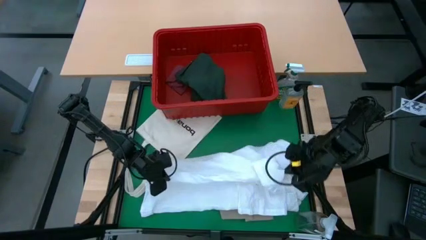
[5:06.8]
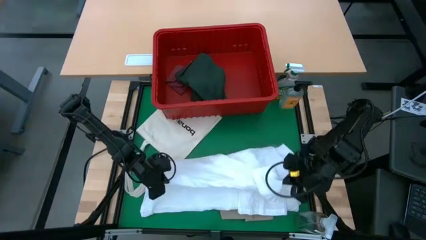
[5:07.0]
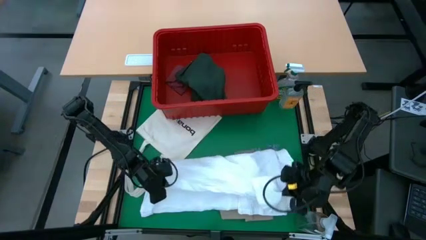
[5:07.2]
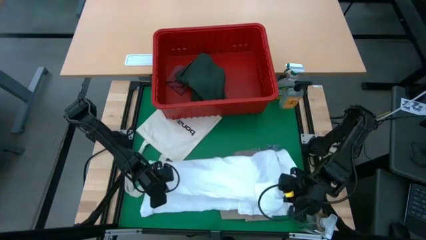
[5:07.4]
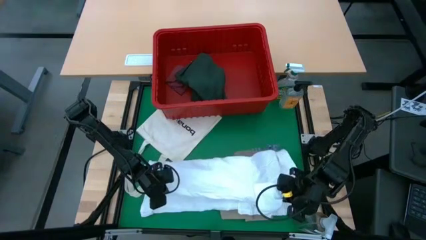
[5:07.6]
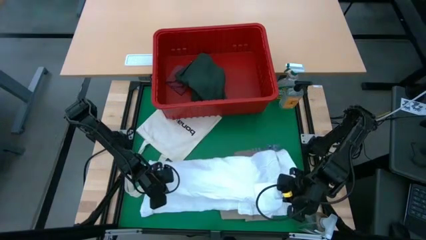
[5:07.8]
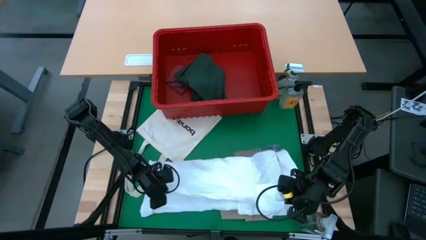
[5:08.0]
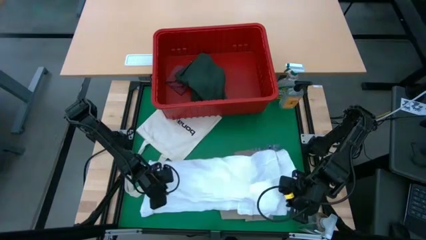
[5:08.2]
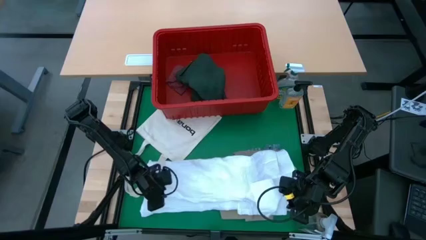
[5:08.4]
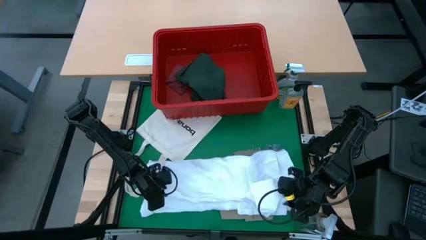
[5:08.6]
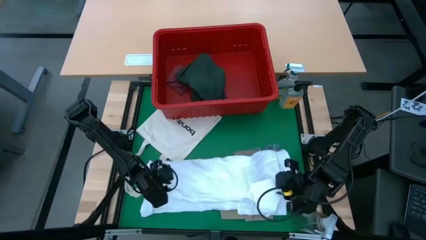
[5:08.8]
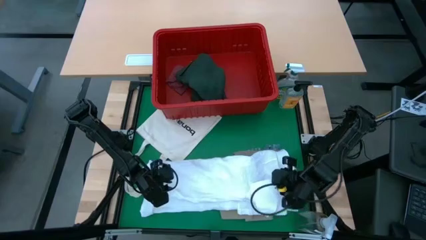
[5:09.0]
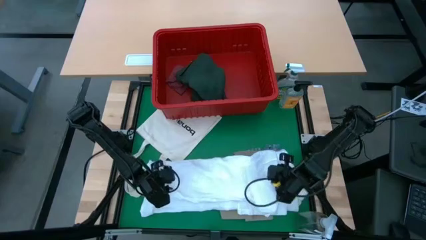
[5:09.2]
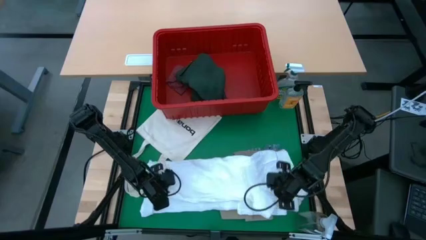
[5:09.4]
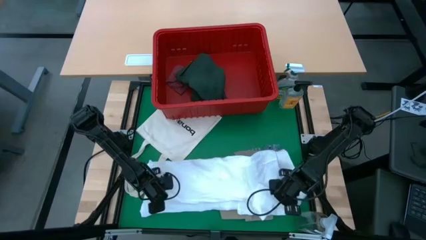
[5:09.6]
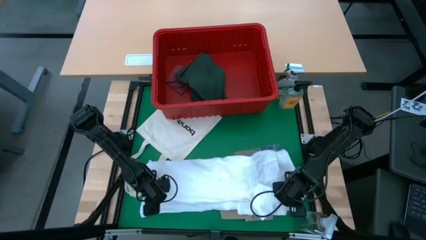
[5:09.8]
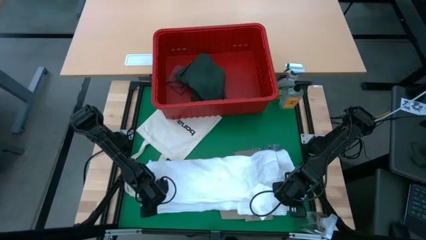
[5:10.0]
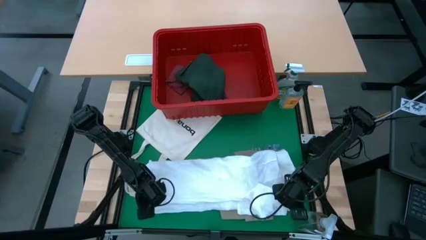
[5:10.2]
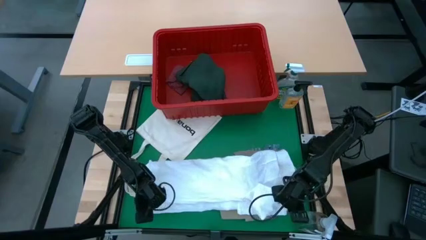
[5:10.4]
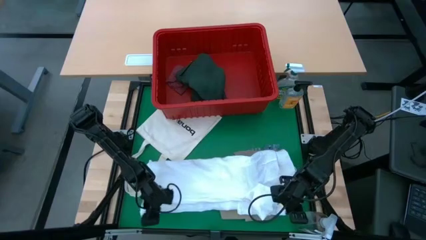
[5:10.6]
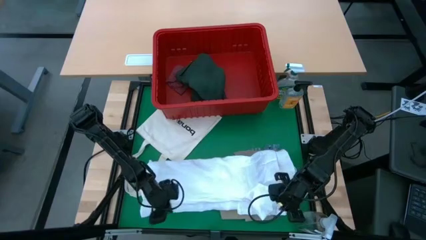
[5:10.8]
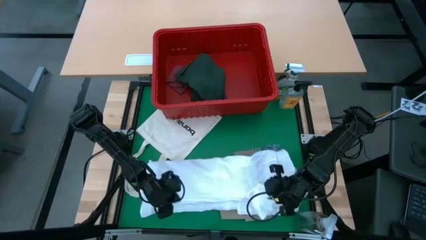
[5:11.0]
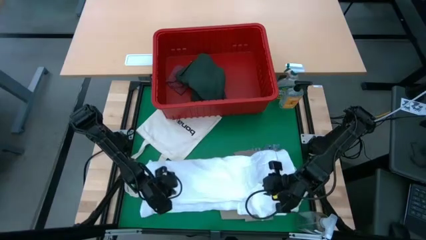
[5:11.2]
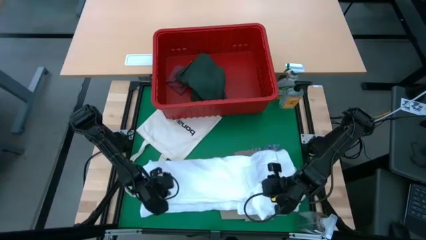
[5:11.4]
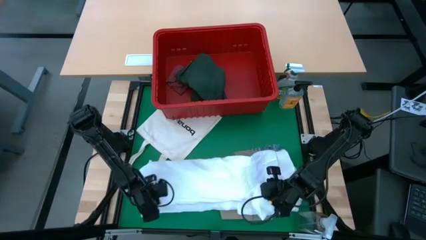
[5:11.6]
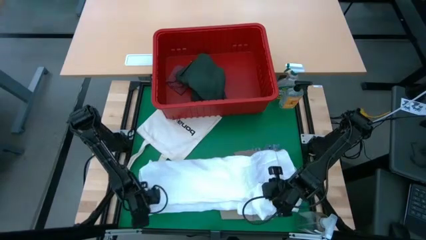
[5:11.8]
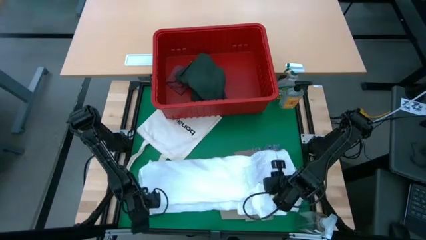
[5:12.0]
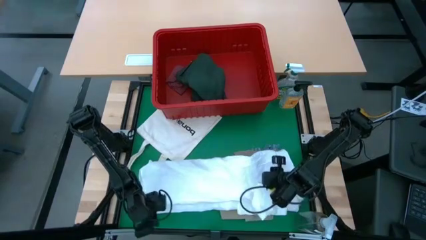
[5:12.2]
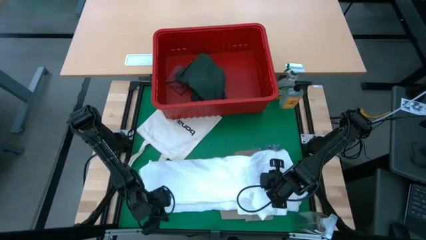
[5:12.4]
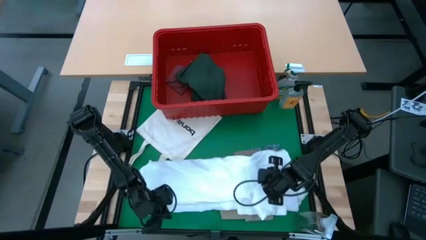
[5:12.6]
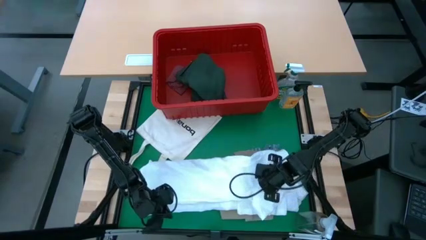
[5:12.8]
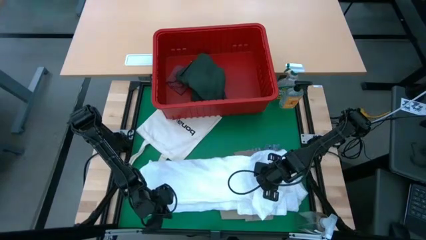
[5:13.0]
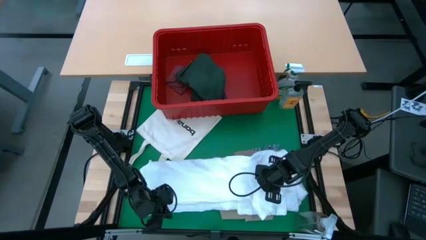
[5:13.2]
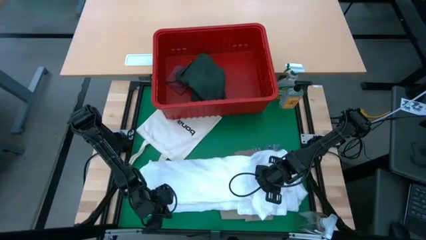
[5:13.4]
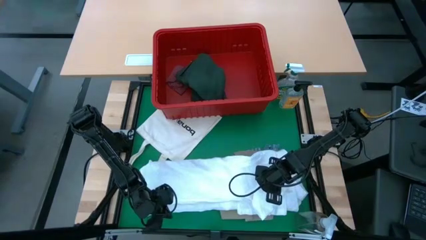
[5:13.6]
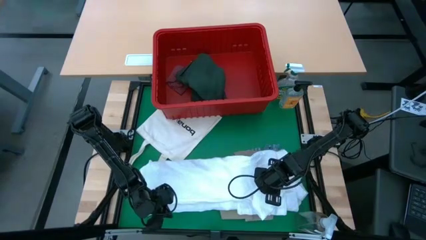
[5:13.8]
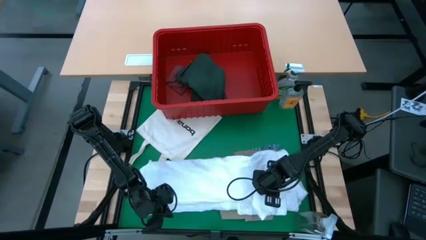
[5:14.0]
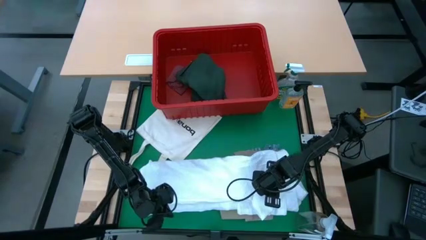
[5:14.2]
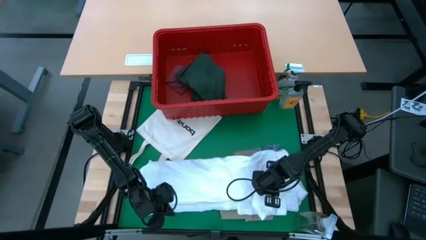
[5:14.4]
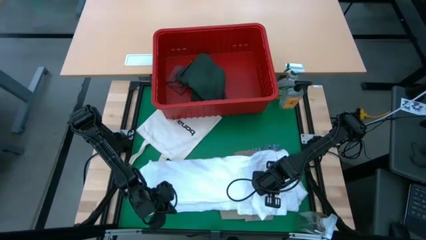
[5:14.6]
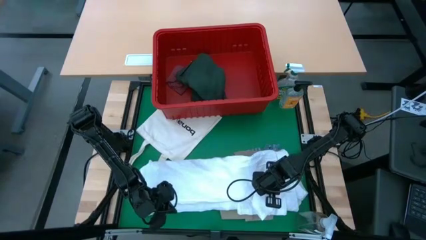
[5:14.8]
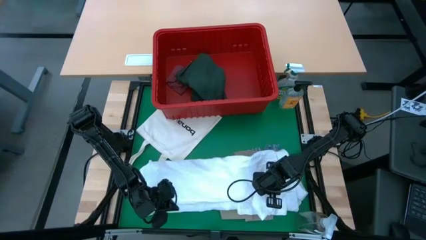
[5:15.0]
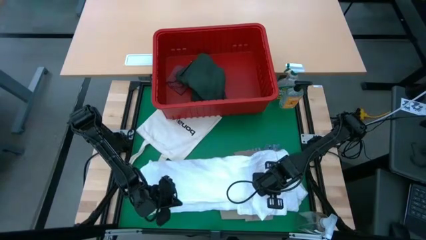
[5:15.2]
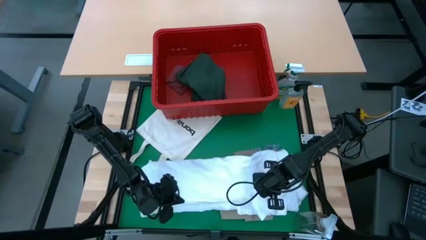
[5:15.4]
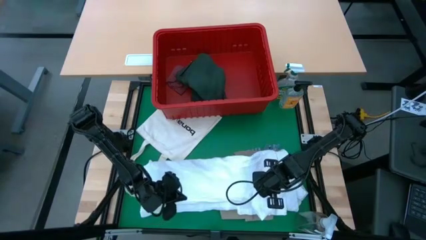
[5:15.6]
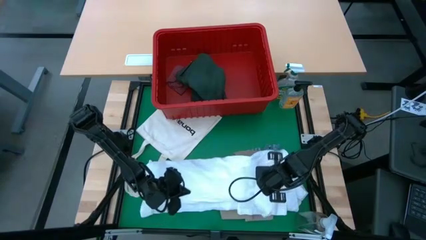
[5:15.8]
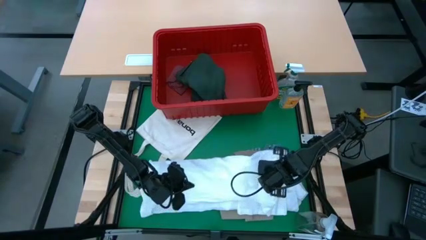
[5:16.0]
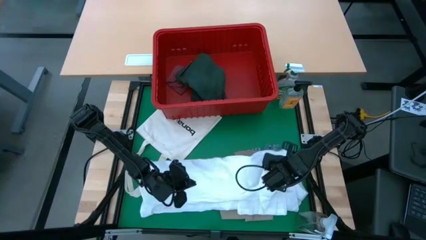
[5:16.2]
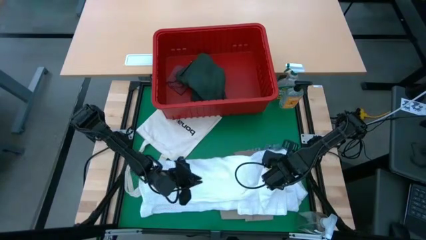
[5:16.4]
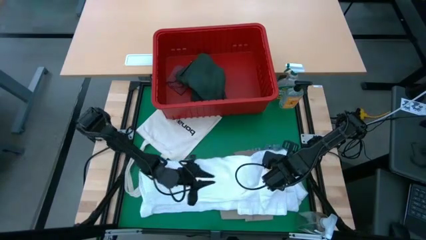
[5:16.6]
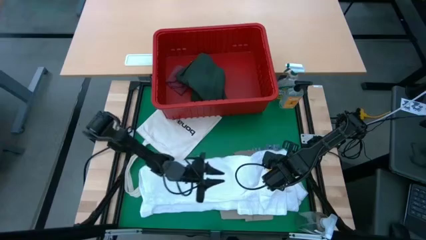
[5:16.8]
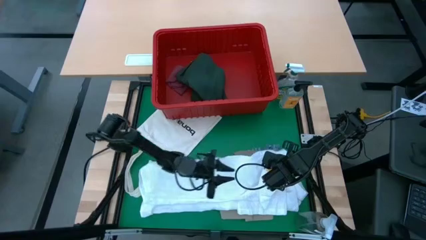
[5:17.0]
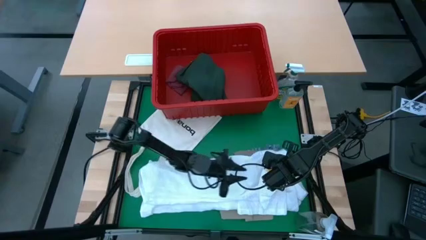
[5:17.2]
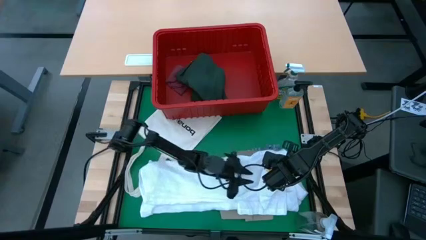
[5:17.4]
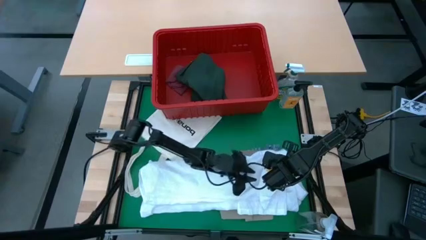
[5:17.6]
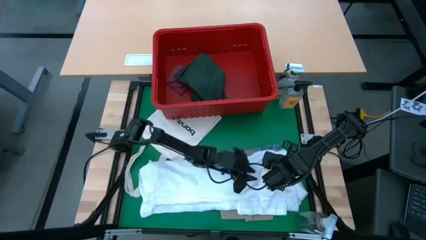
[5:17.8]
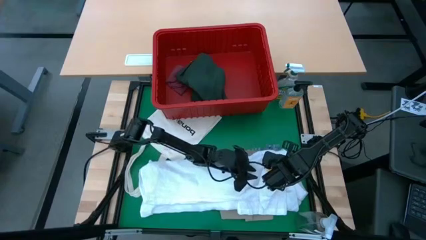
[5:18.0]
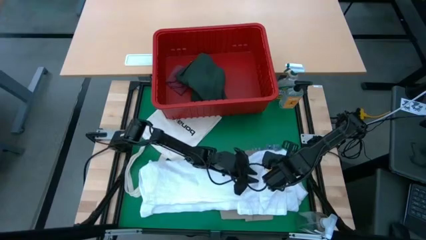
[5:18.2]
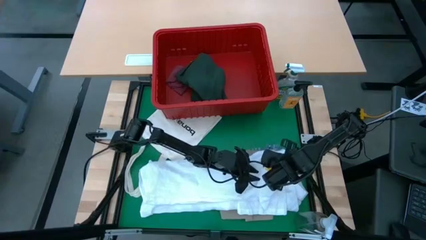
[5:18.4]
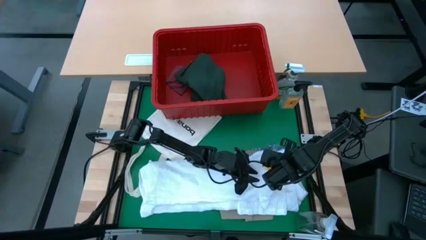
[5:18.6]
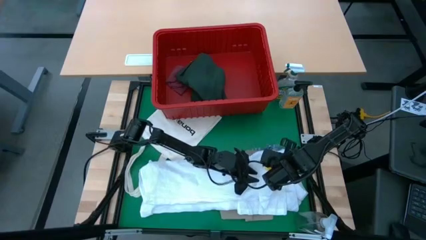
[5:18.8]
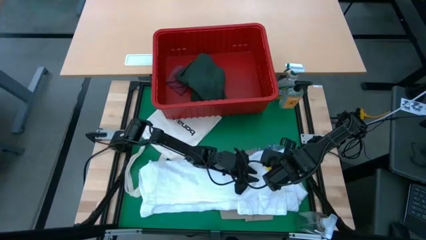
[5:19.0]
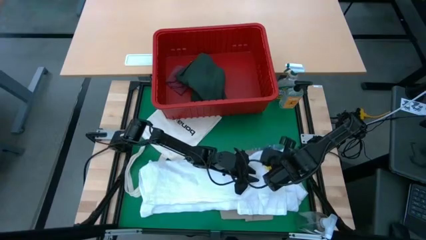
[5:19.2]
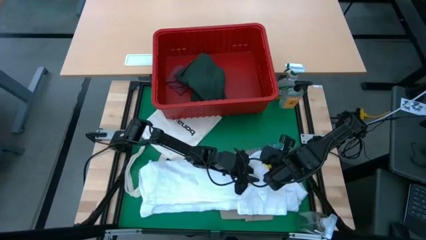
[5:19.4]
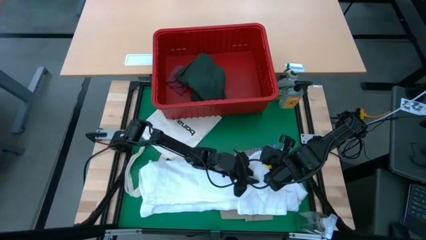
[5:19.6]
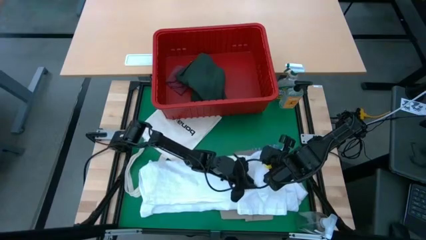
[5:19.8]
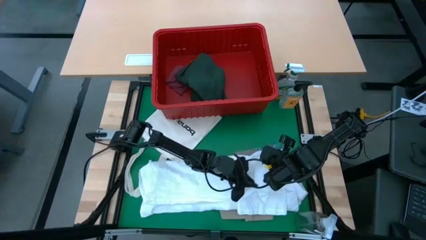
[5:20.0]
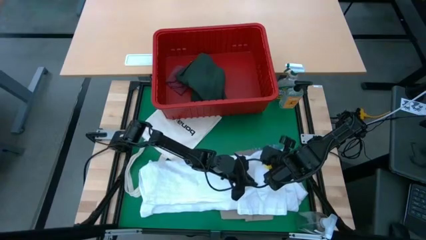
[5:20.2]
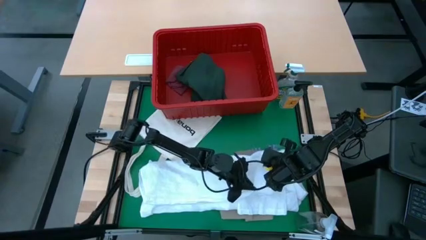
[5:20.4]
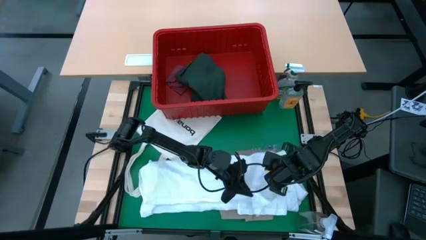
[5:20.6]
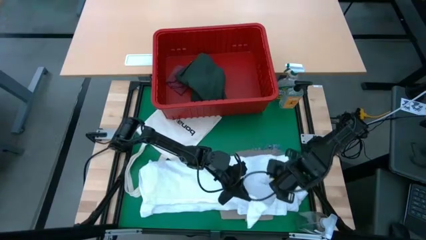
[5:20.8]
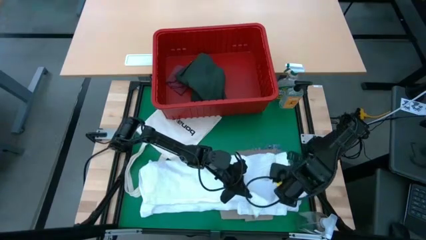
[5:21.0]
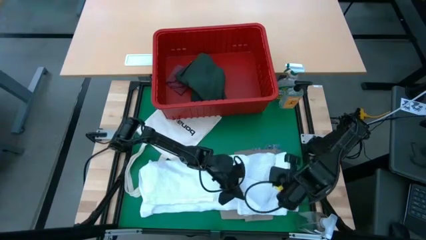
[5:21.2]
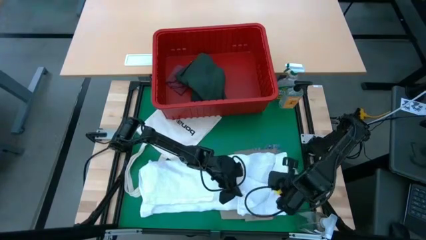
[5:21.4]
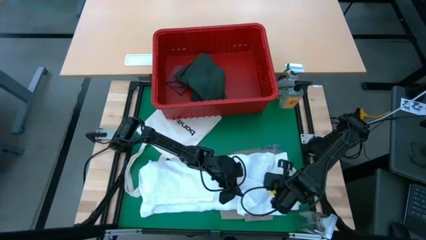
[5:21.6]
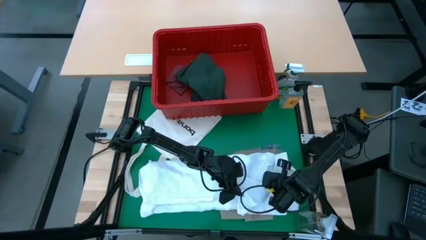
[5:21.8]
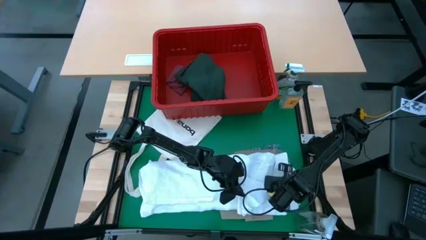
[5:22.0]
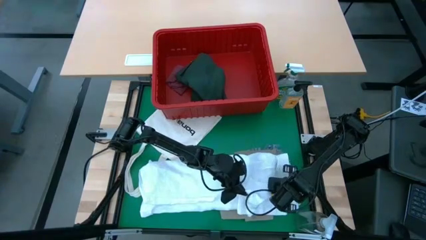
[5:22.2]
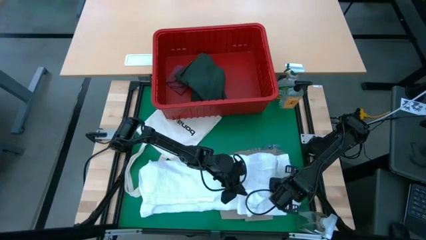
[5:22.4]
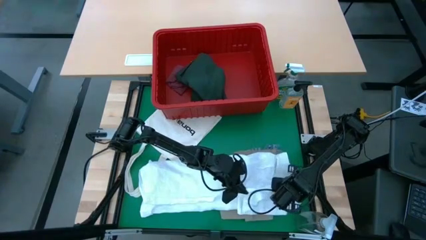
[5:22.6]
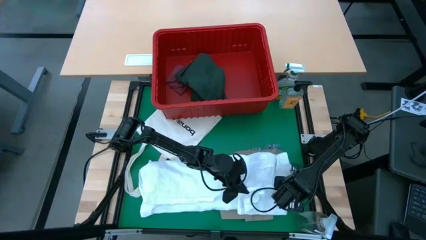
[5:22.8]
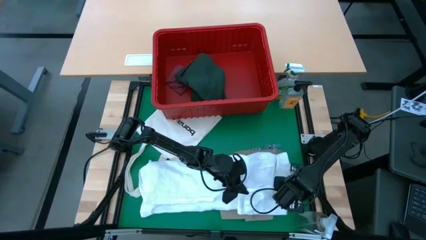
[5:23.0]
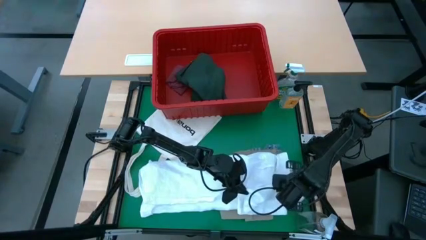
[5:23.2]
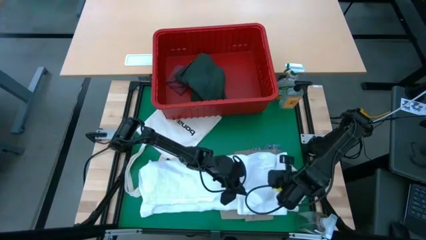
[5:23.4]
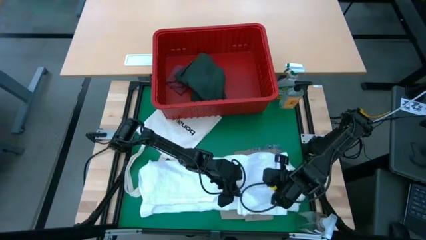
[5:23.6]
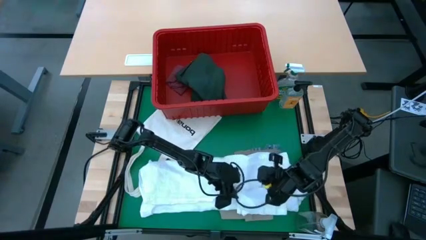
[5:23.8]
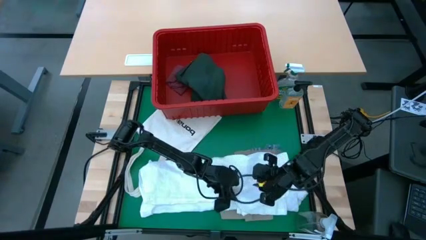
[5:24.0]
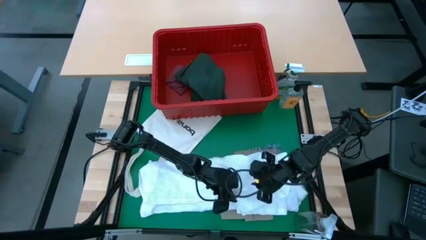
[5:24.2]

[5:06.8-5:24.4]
Task: Fold Laundry from Bin
Fold the white polo shirt
